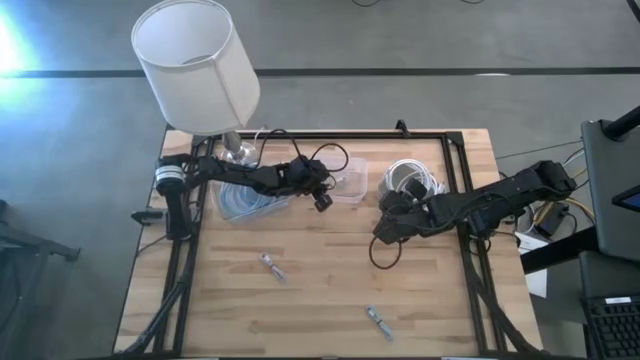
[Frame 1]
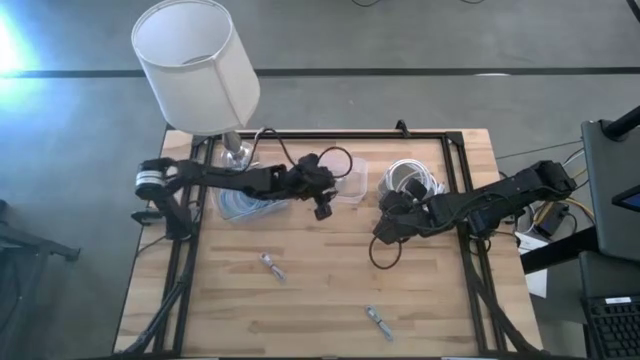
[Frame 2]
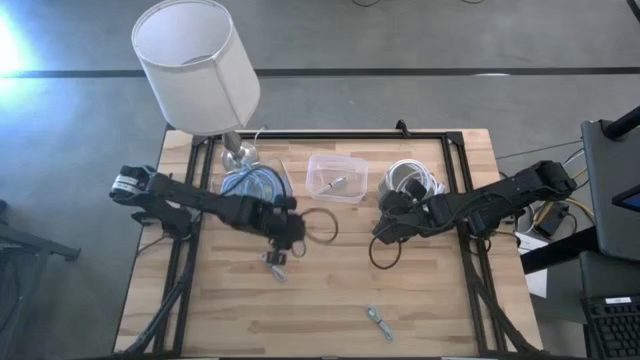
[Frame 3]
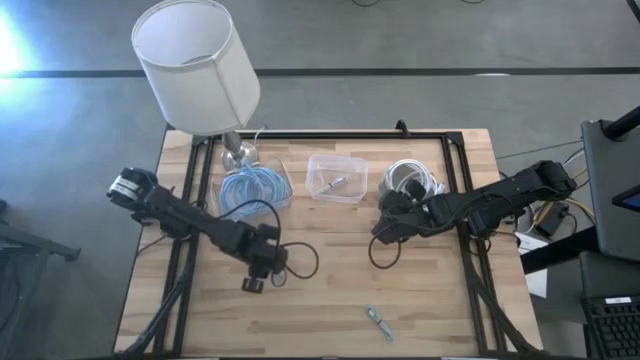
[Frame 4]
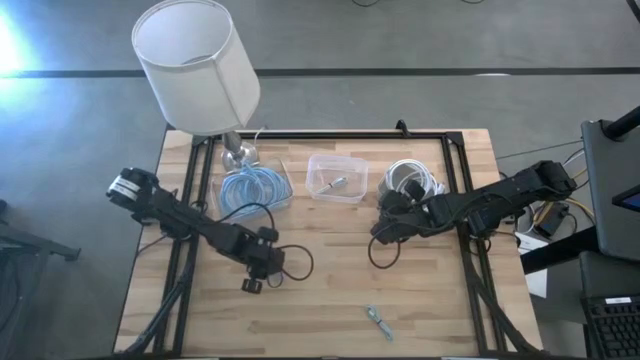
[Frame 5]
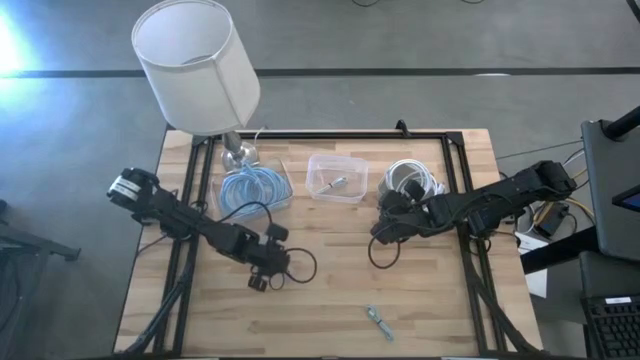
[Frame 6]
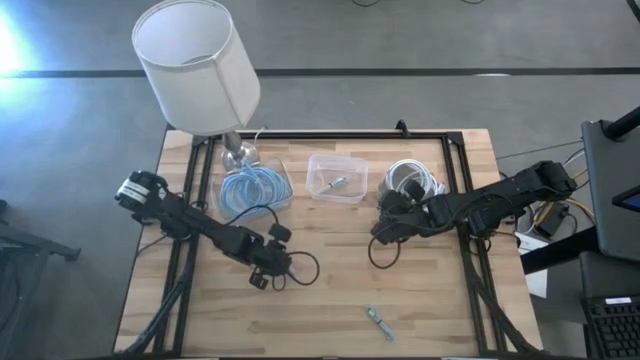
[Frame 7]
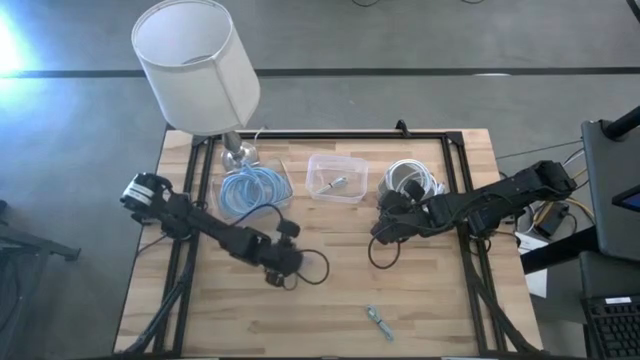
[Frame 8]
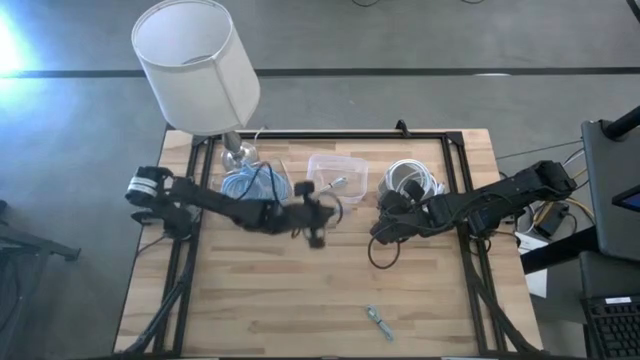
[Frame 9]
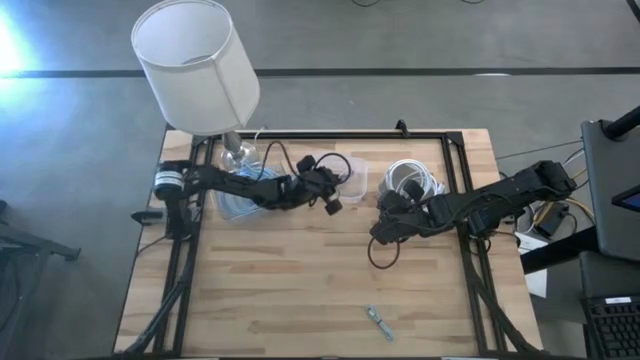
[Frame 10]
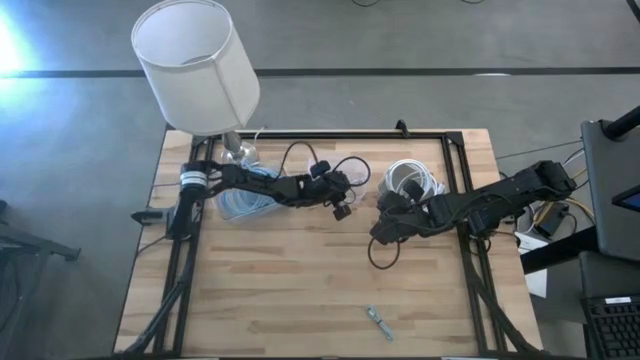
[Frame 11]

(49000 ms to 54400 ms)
Task: Pick & Place USB Port
Put the left blue charger cable into the right transparent bin

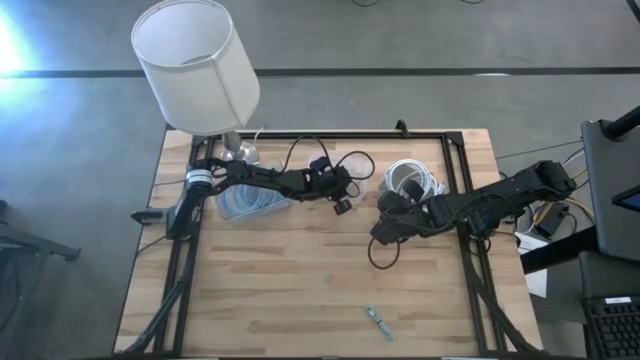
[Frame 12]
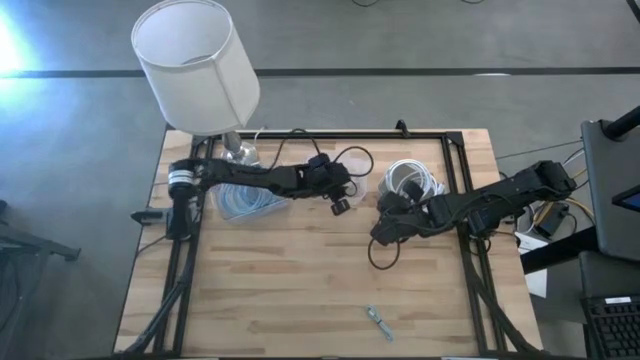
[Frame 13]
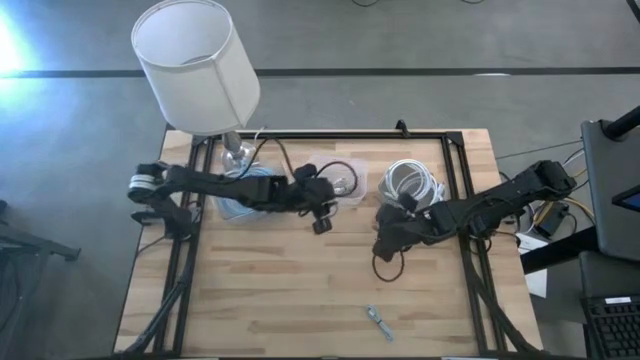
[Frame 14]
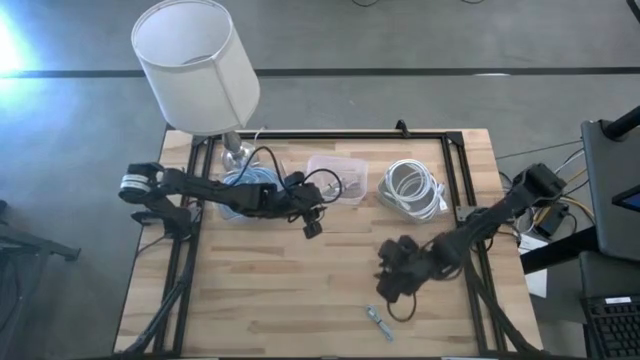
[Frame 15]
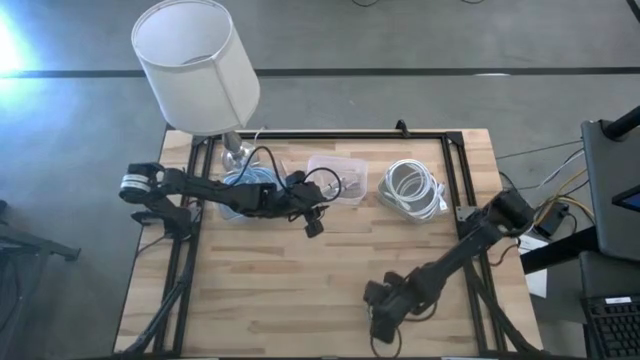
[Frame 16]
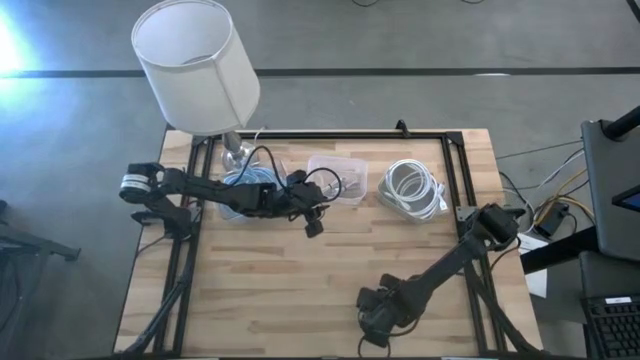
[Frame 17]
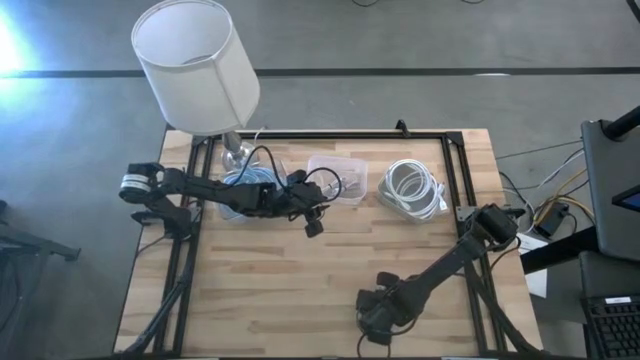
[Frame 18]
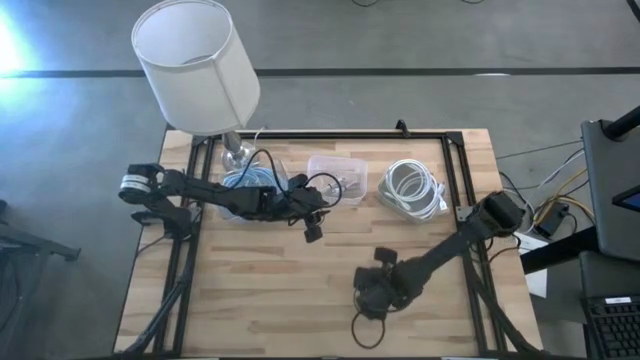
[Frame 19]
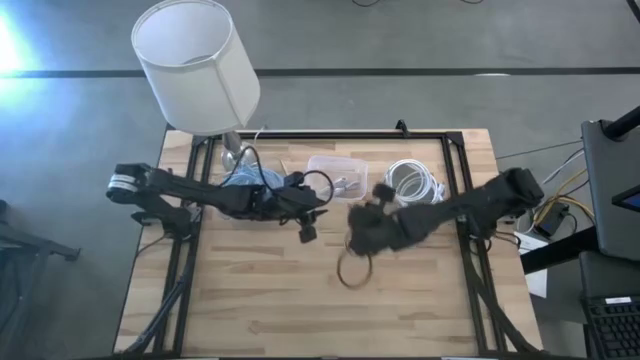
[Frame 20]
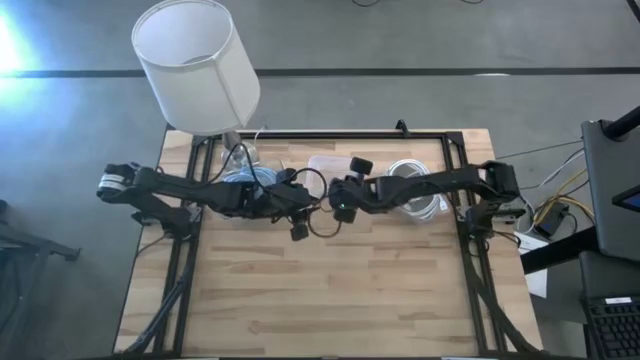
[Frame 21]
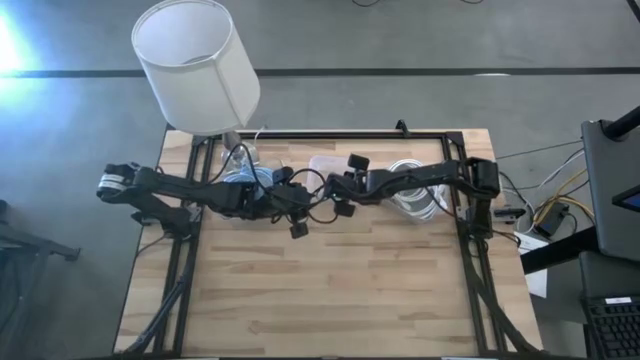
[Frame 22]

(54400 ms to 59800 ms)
Put the blue charger cable into the right transparent bin

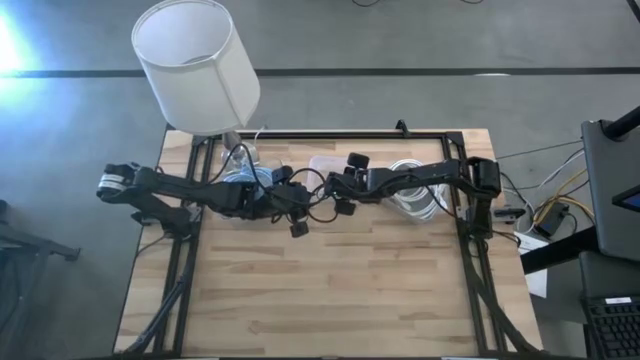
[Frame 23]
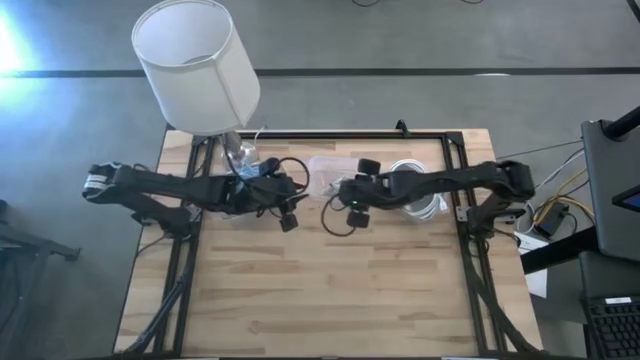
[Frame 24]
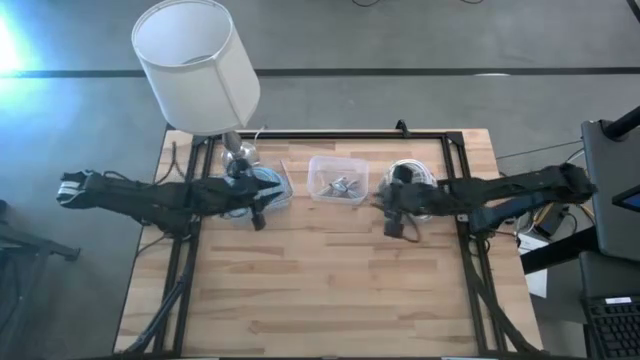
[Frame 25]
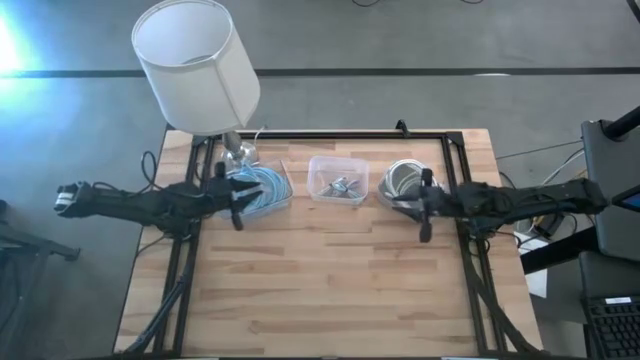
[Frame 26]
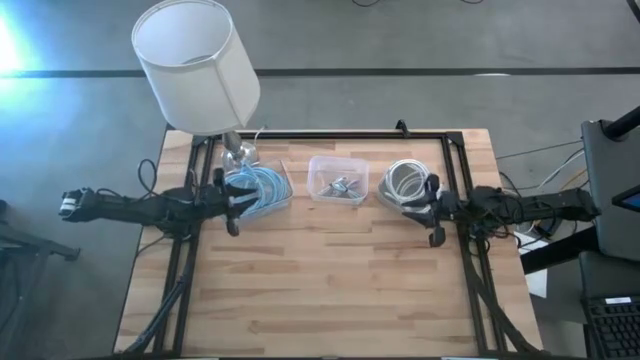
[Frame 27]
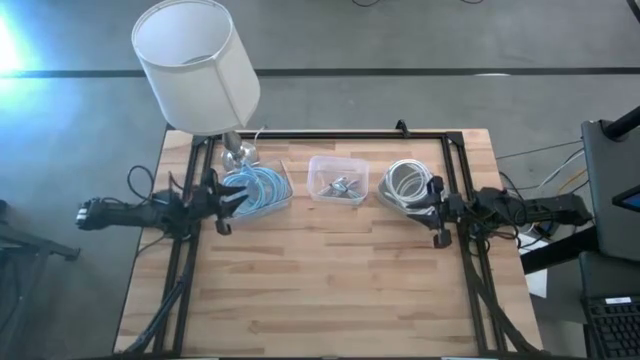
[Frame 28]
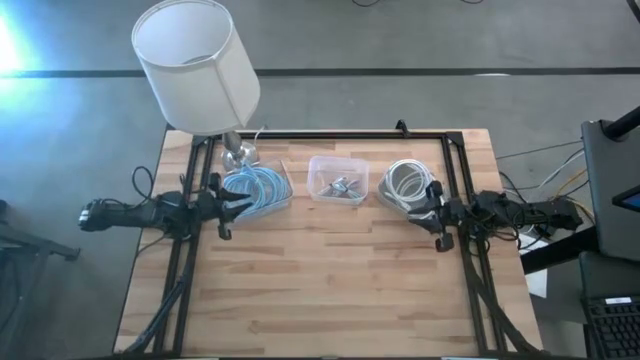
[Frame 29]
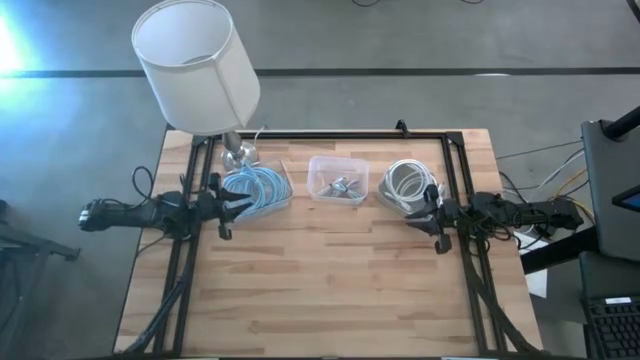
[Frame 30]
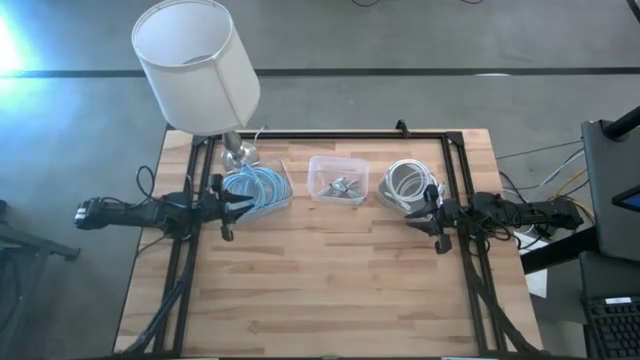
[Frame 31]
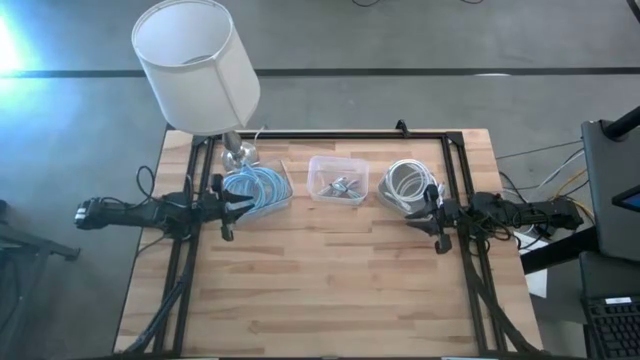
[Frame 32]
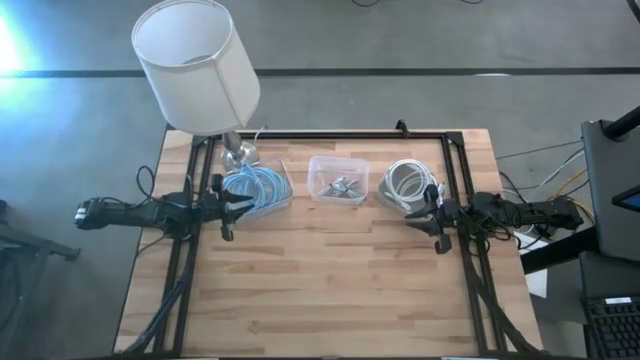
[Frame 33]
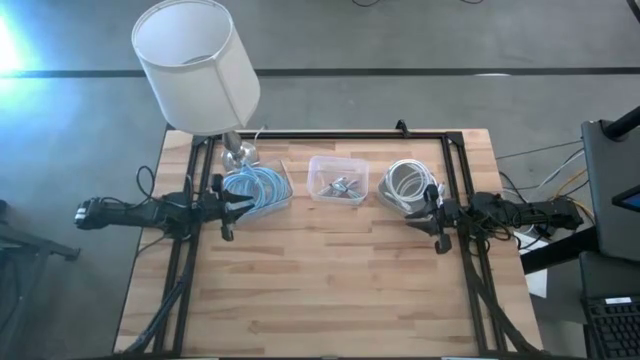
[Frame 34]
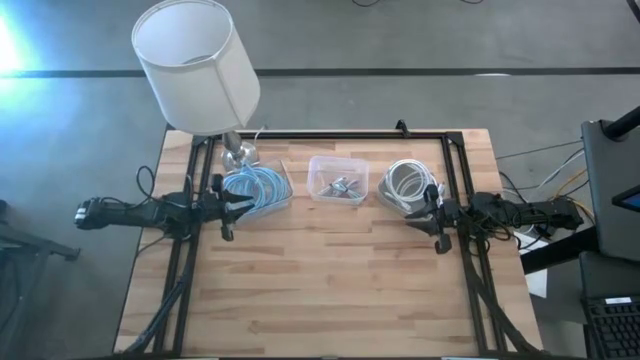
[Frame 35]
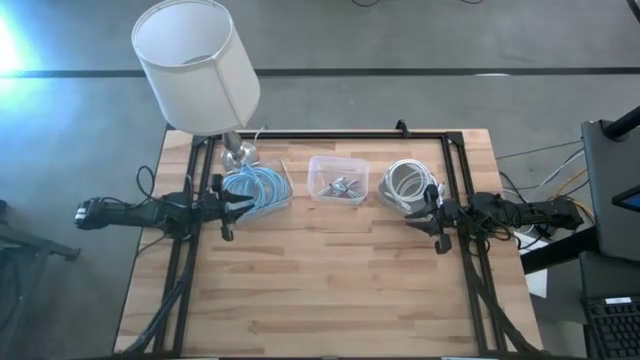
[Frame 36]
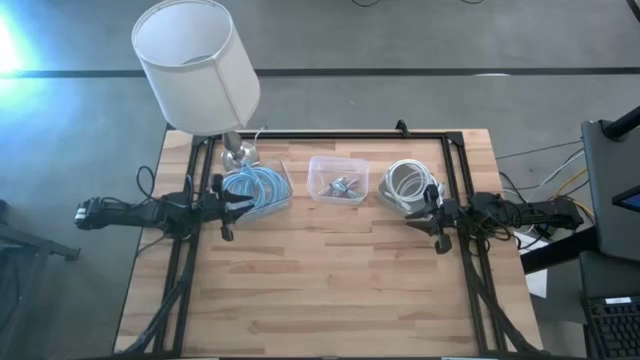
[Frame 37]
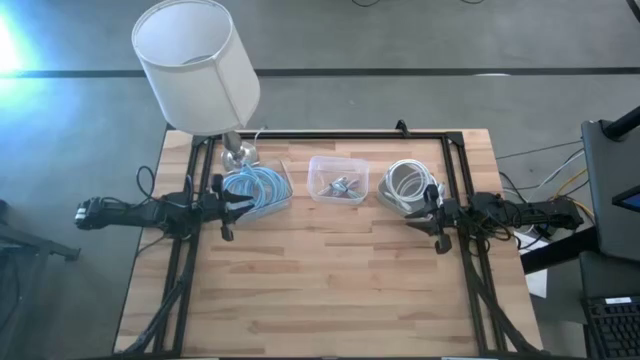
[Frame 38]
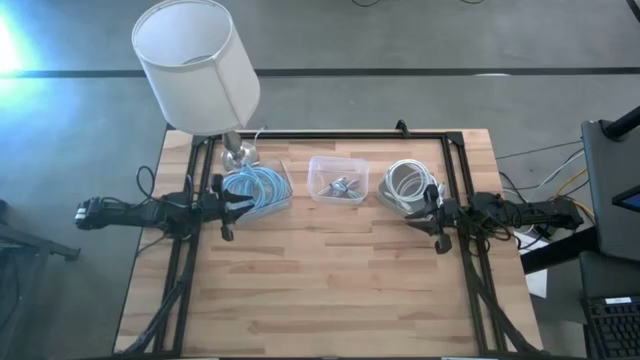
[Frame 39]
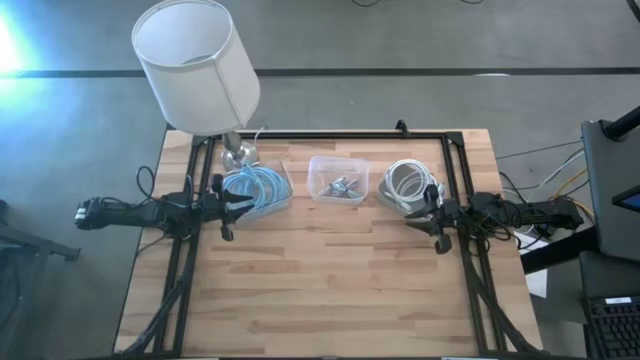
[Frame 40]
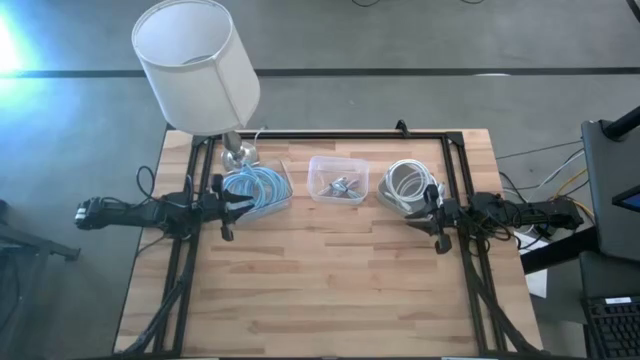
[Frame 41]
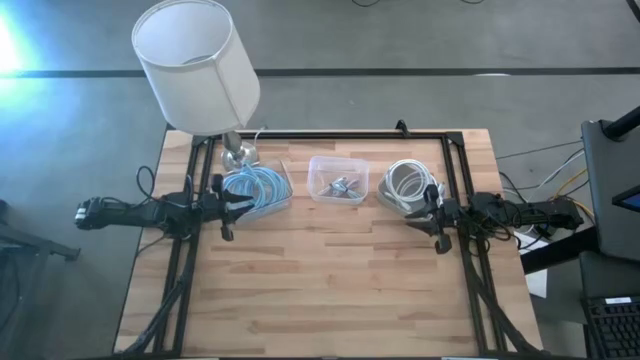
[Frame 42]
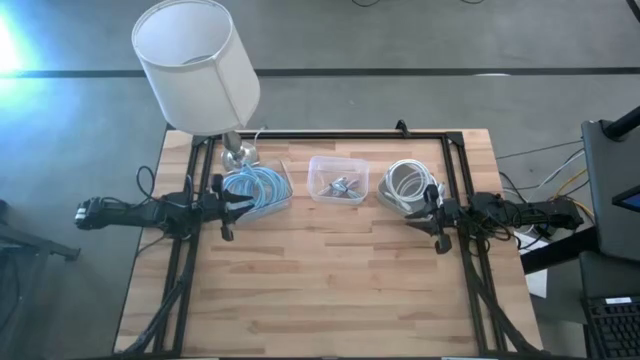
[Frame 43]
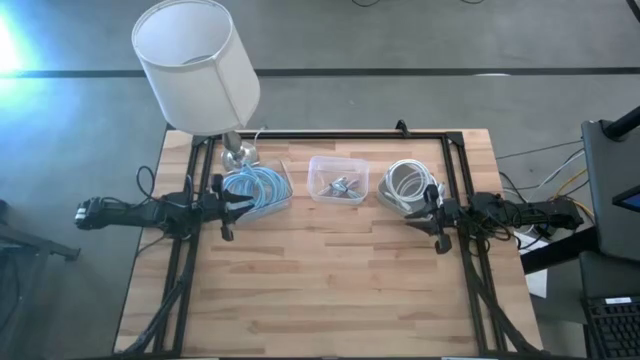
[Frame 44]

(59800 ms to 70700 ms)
Return to Home Position
